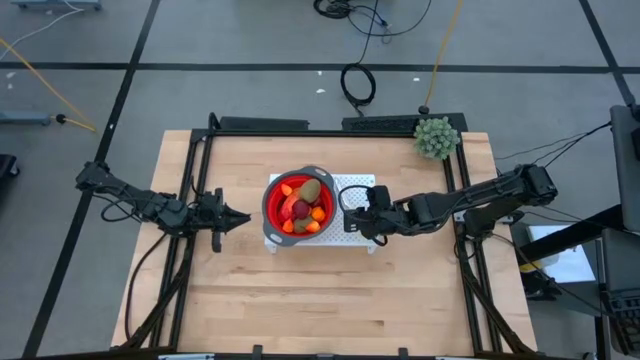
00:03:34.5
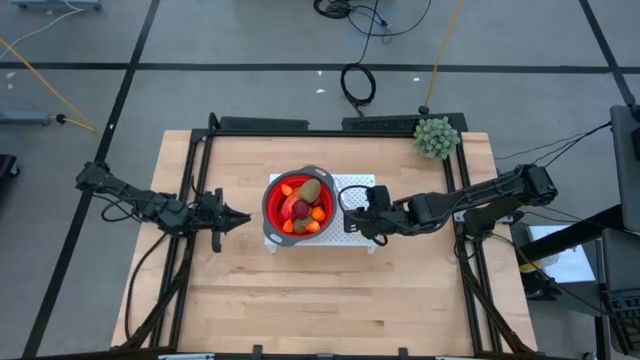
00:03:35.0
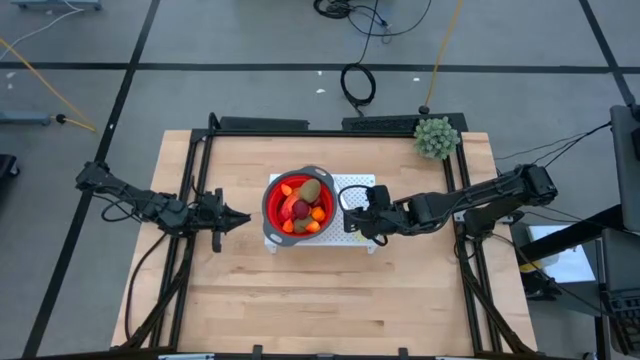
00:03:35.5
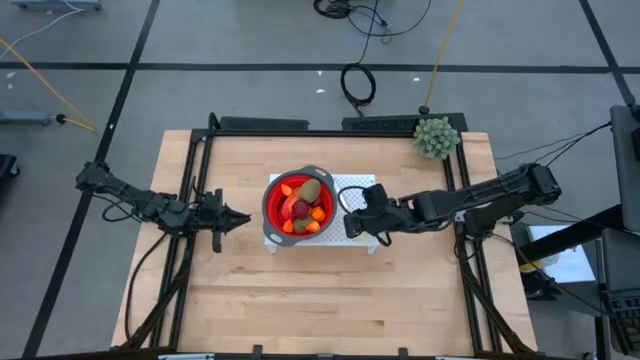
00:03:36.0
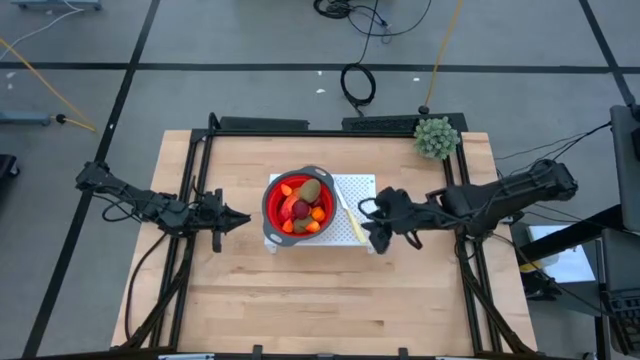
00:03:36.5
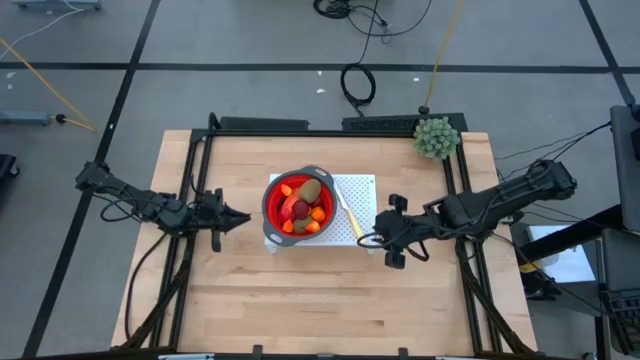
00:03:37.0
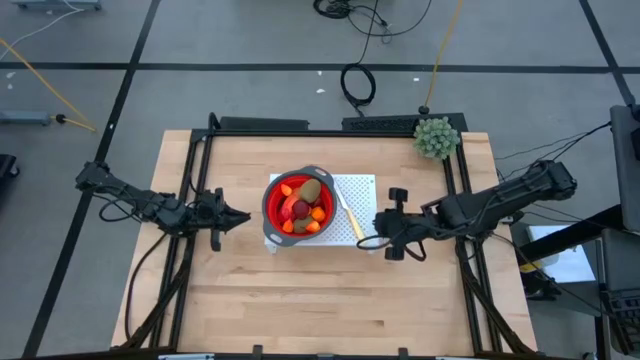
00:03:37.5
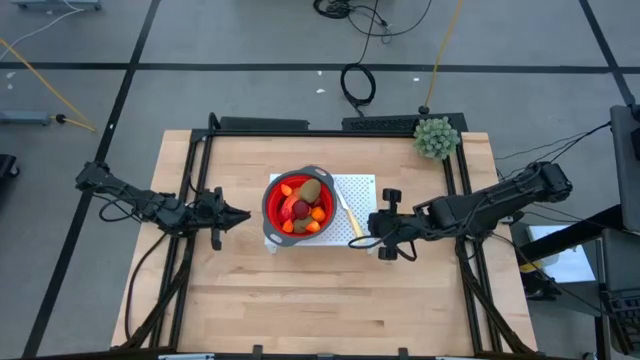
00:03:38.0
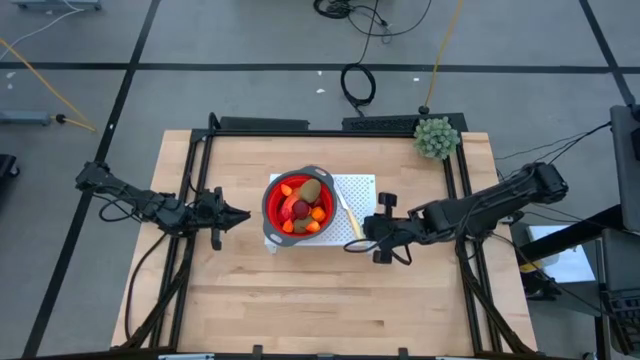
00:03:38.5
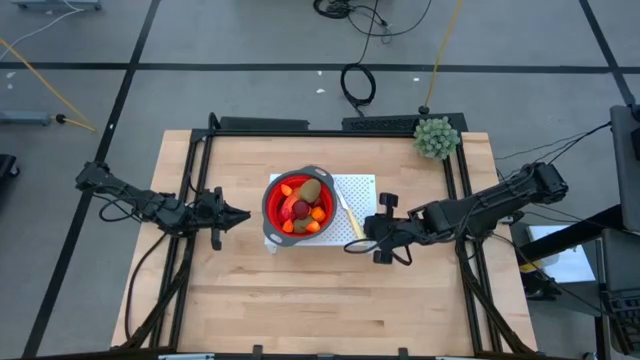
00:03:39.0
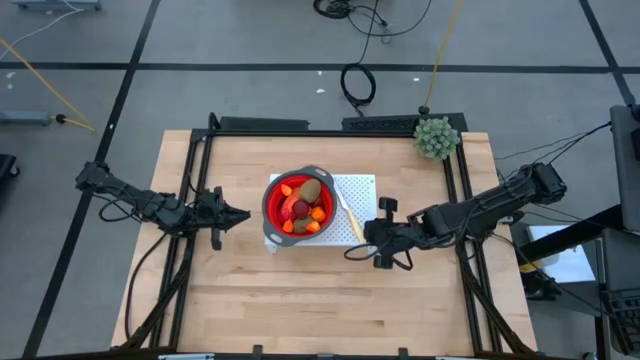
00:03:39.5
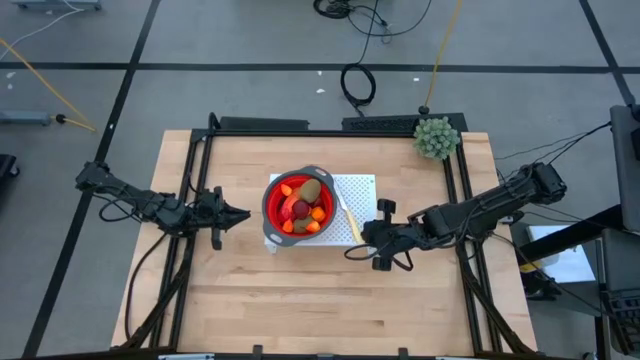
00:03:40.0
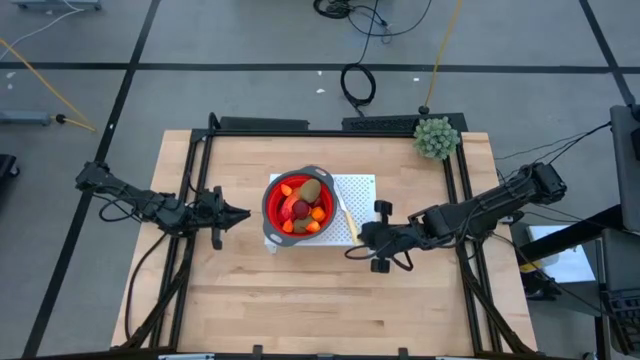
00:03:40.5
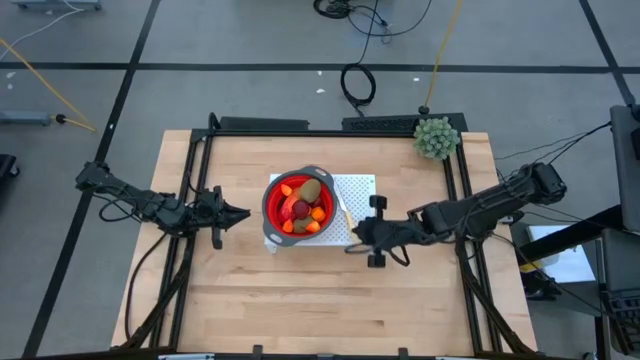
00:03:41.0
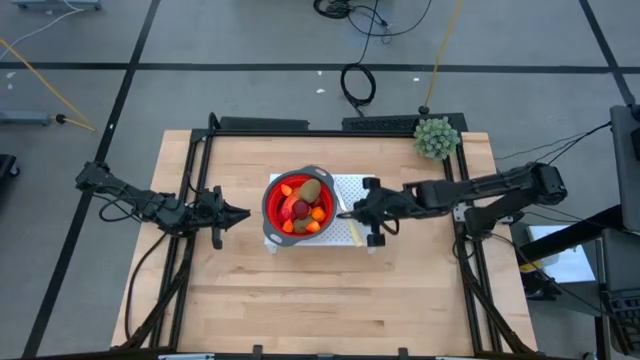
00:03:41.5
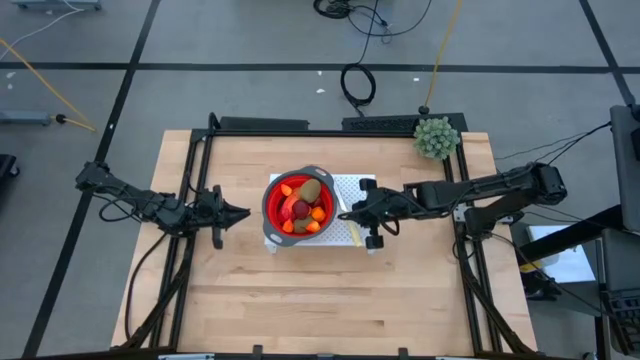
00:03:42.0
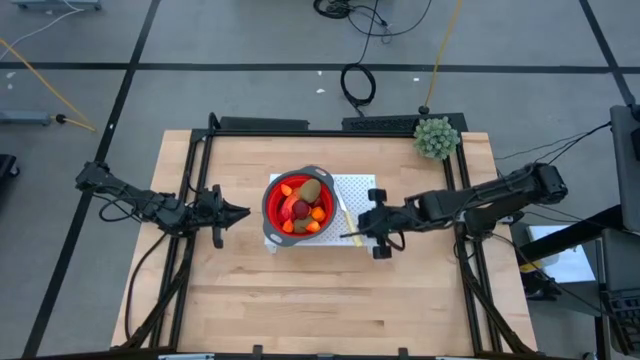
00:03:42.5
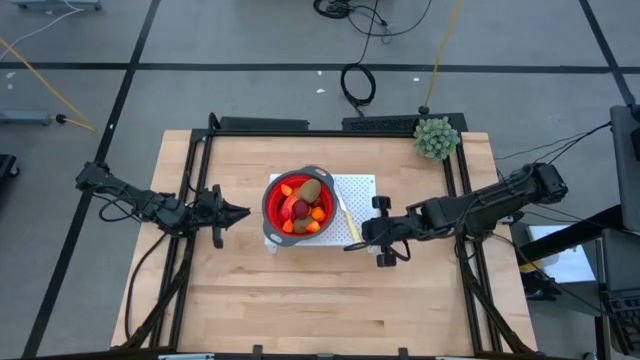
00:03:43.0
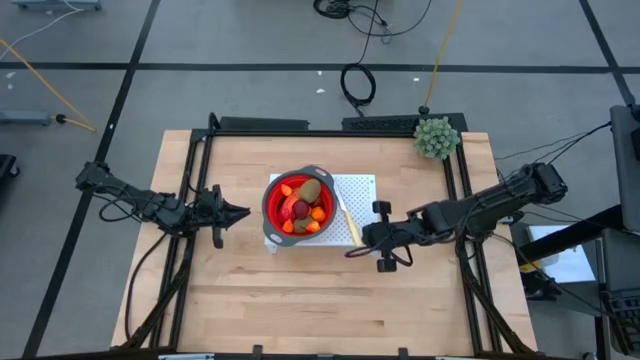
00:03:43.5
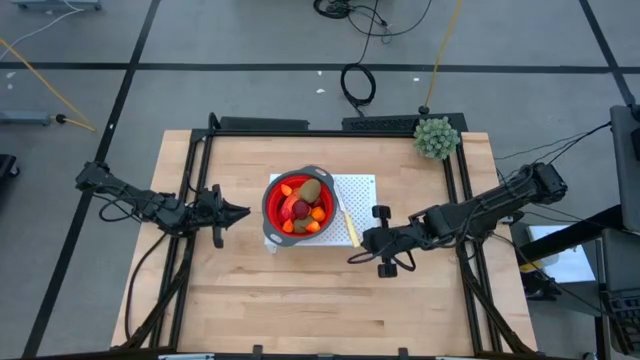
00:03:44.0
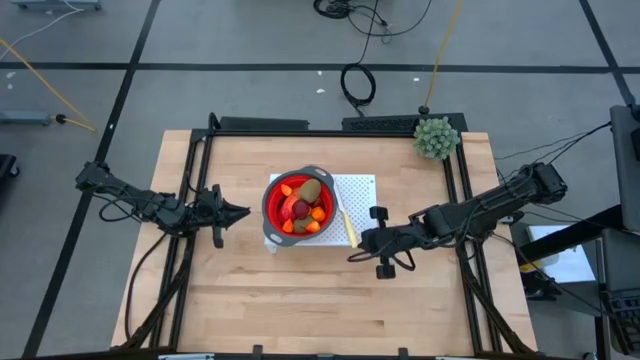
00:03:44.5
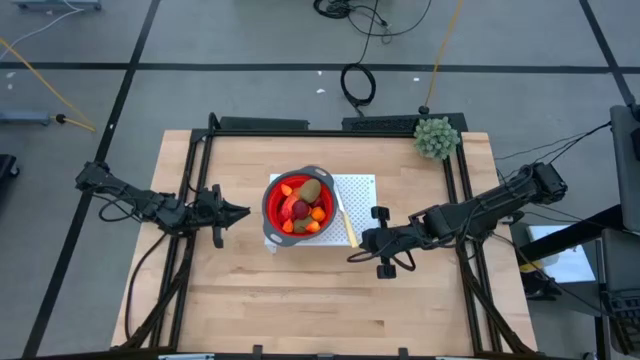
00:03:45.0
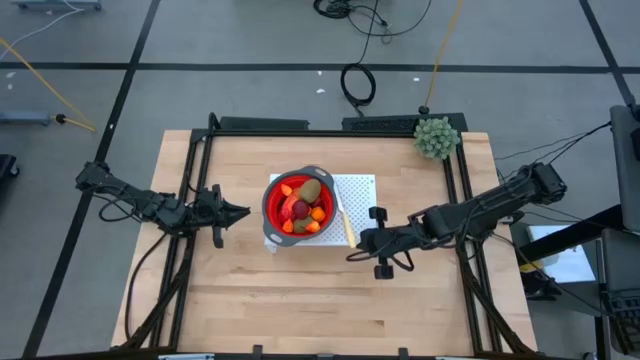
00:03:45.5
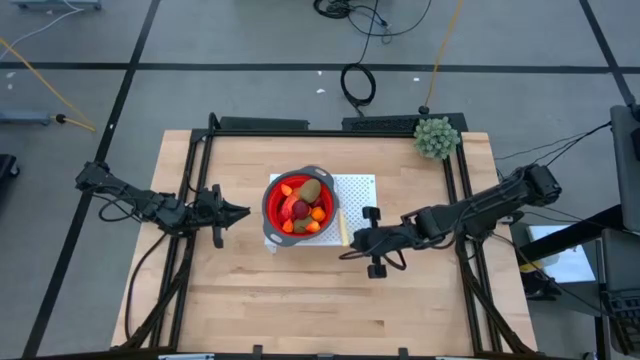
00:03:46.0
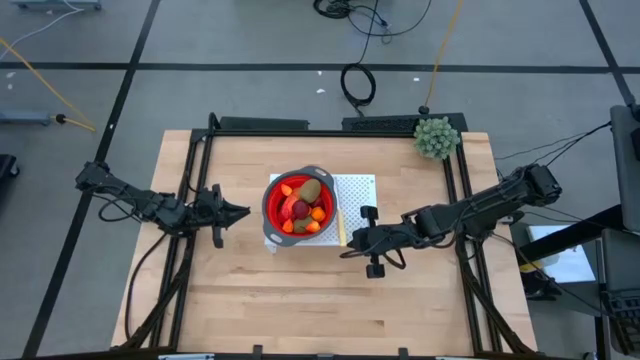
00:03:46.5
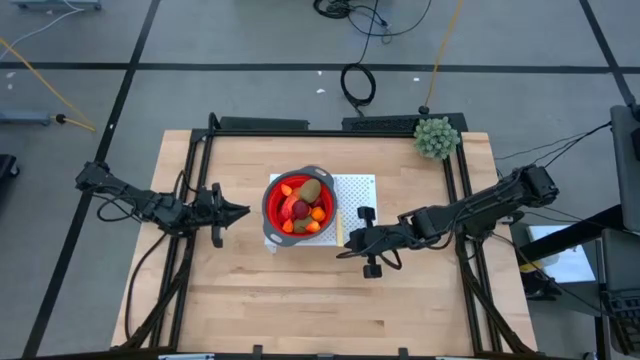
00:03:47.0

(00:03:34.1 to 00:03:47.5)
Task: Pick & Place Fruit
Put the knife on the shelf

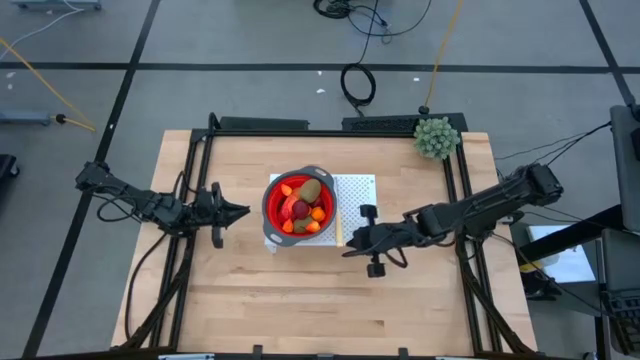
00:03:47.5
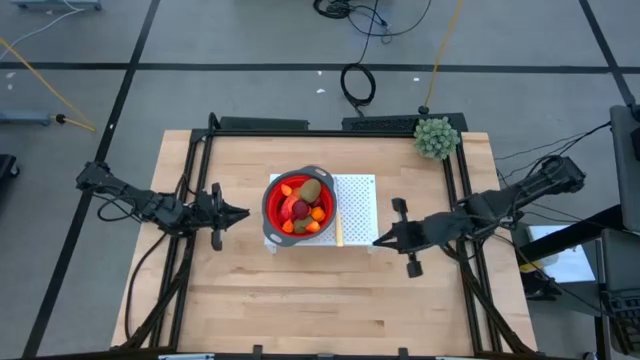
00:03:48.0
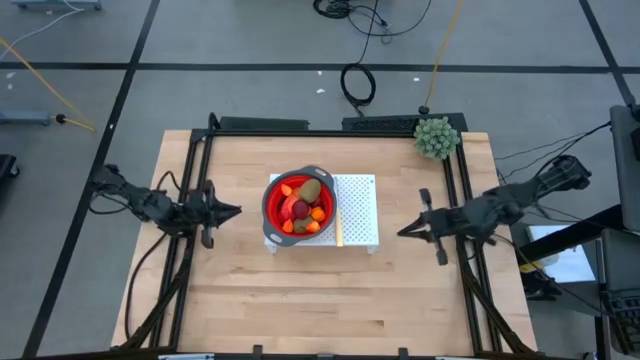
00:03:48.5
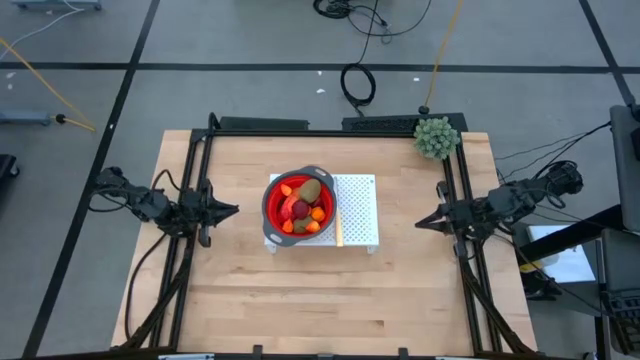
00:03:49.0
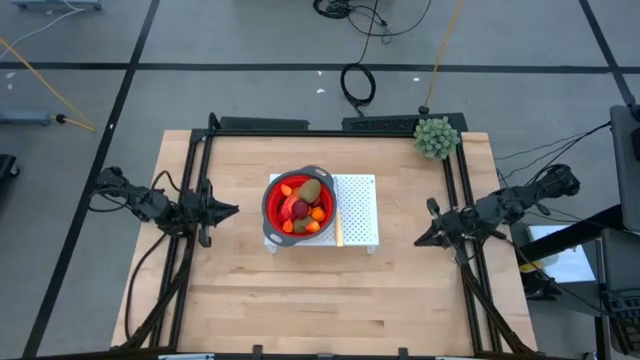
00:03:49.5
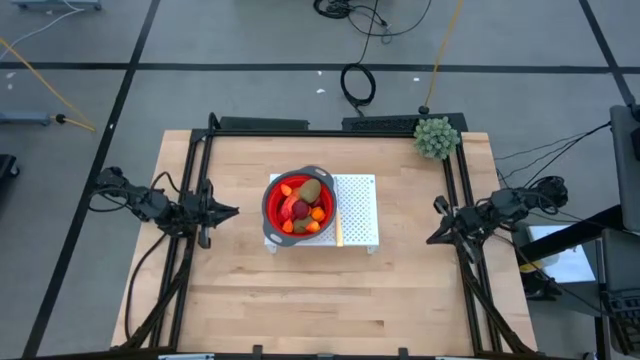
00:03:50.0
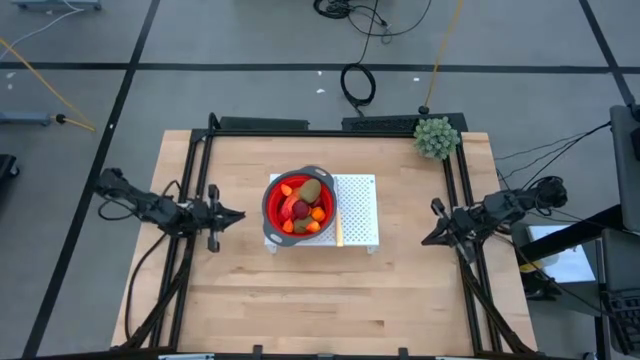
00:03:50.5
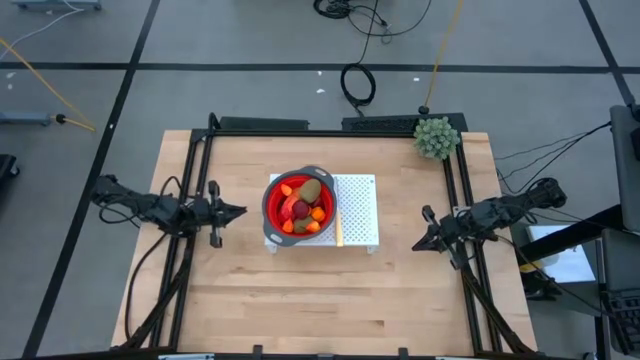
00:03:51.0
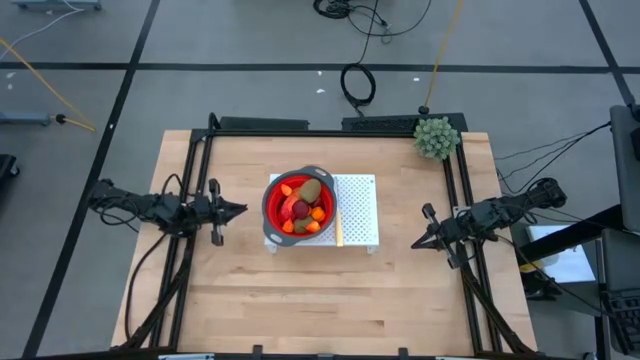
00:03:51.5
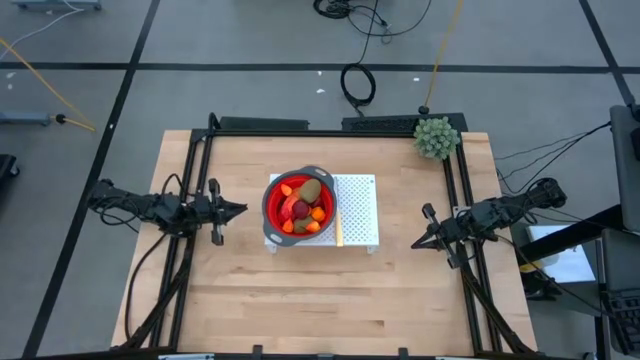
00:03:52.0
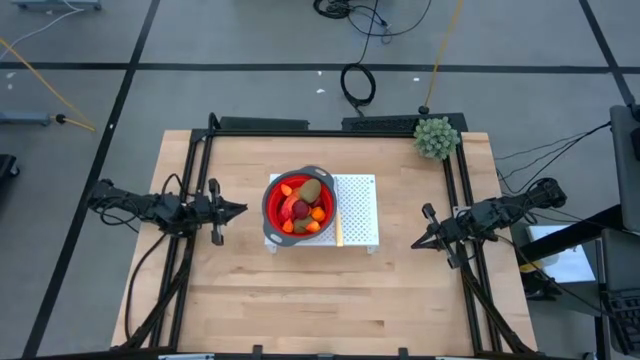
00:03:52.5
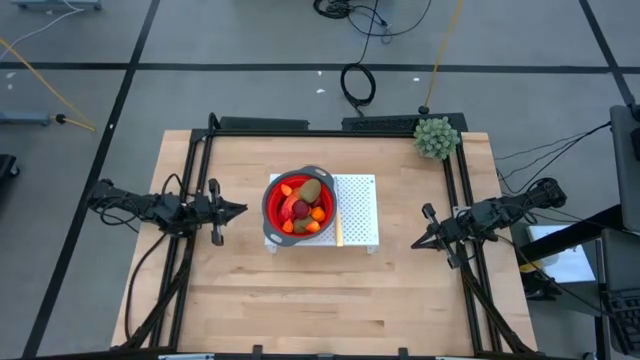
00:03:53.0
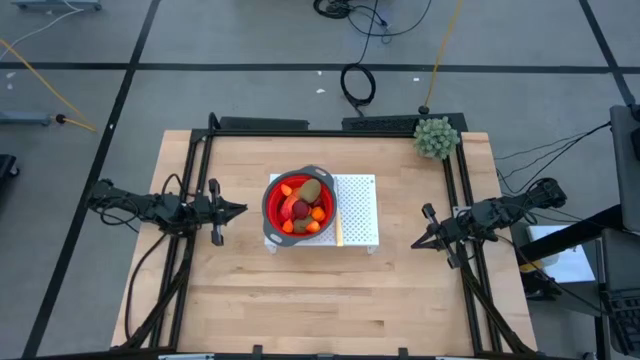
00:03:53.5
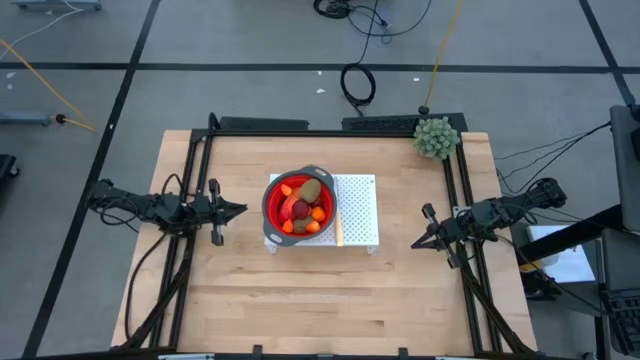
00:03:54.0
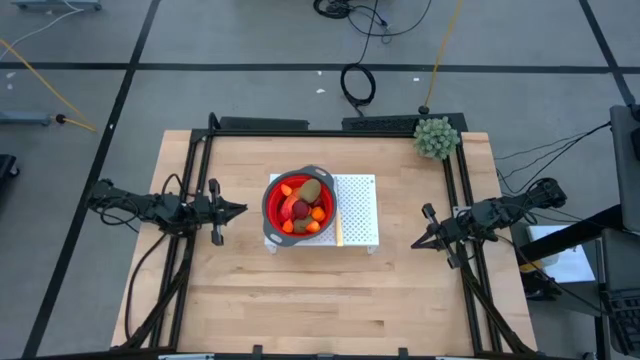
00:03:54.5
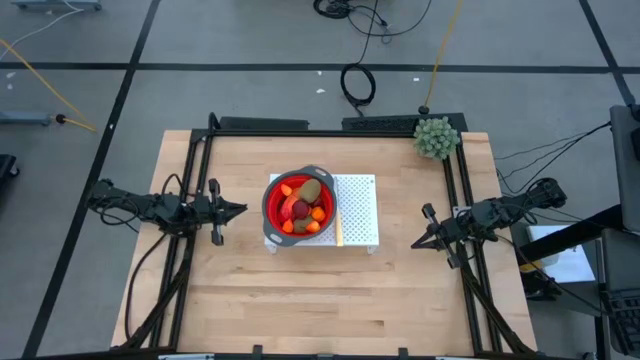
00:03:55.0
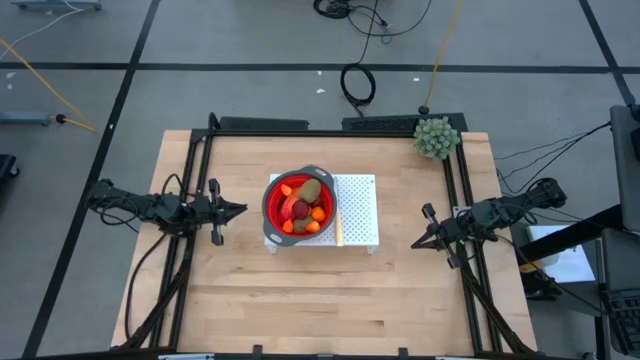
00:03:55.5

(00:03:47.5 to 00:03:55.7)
Return to Home Position
